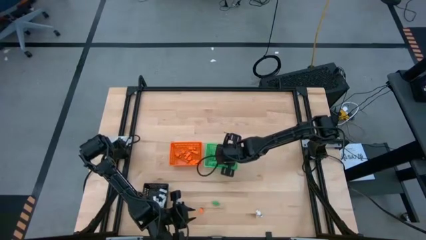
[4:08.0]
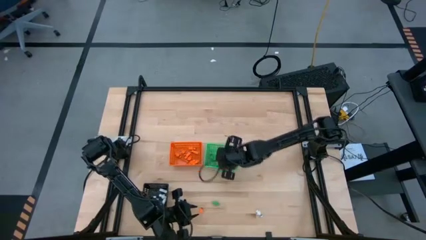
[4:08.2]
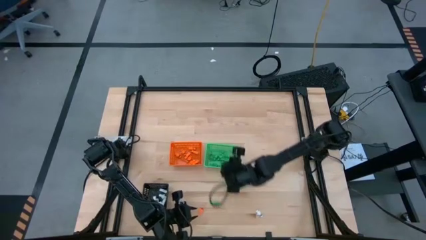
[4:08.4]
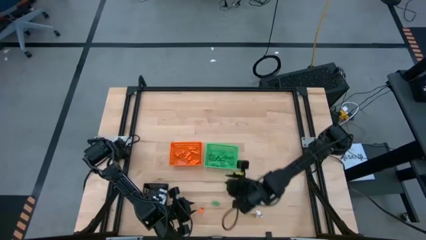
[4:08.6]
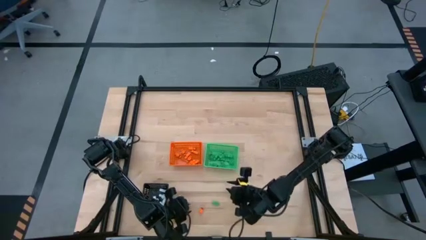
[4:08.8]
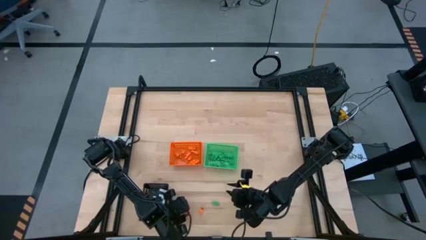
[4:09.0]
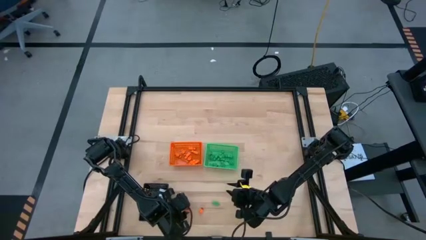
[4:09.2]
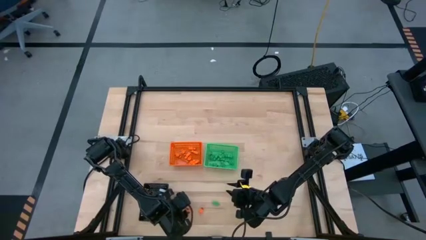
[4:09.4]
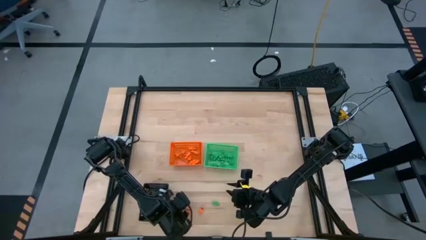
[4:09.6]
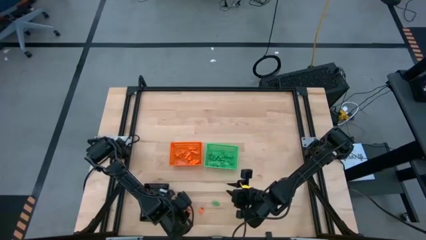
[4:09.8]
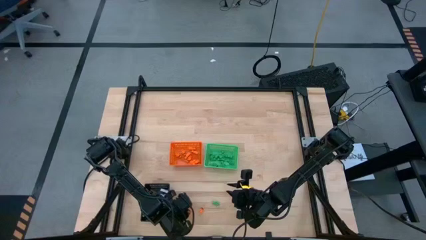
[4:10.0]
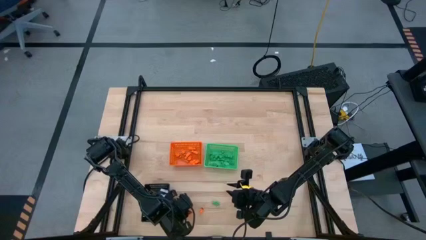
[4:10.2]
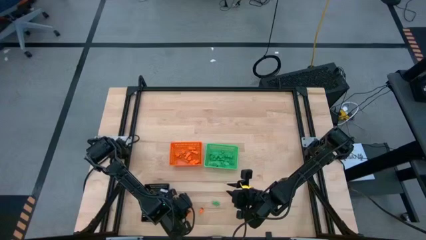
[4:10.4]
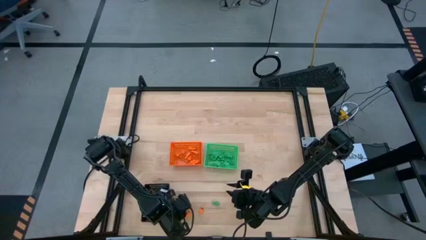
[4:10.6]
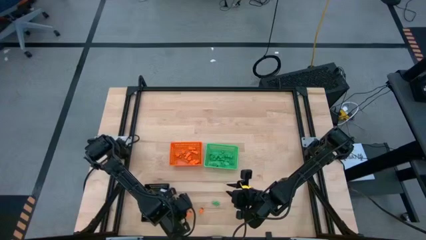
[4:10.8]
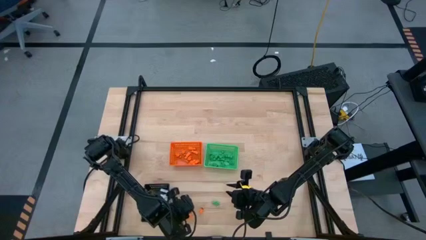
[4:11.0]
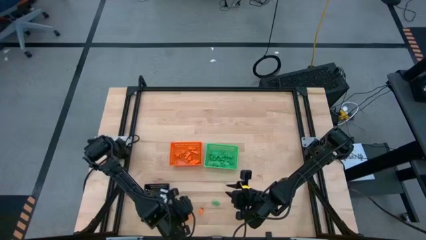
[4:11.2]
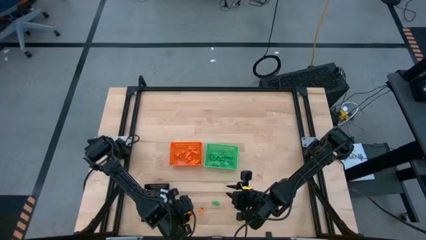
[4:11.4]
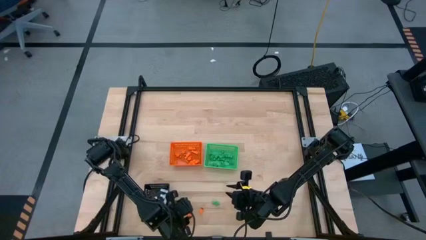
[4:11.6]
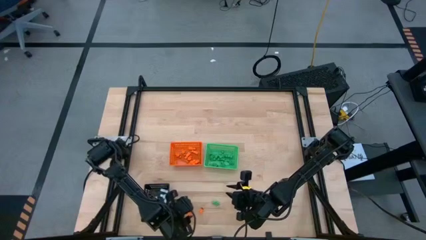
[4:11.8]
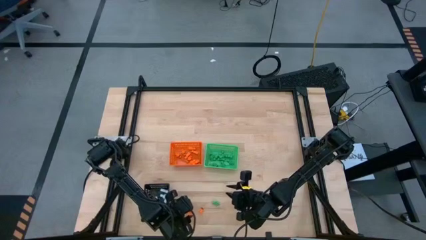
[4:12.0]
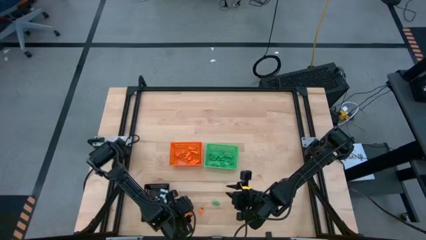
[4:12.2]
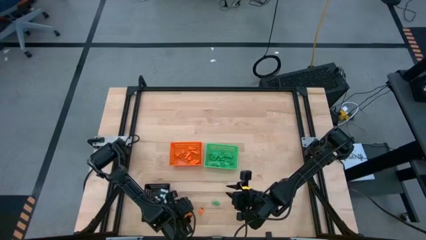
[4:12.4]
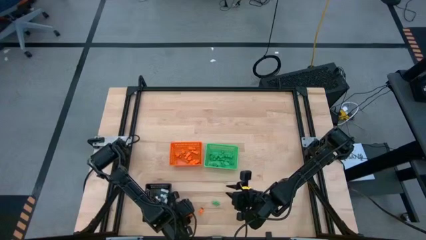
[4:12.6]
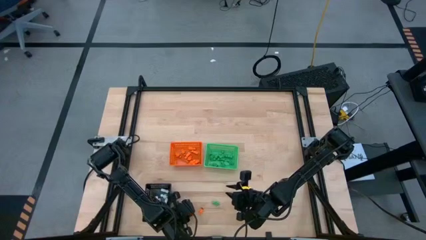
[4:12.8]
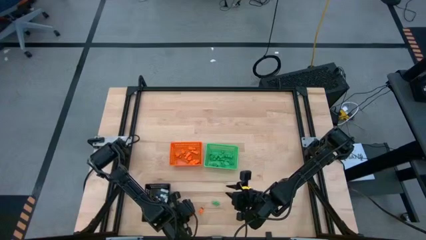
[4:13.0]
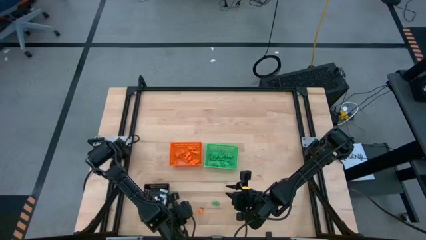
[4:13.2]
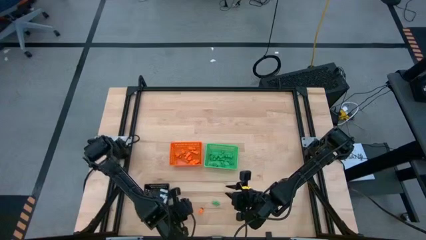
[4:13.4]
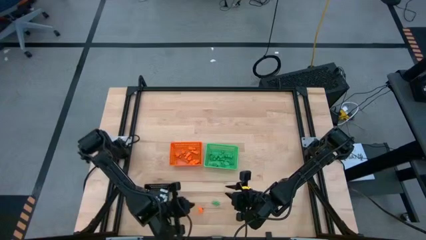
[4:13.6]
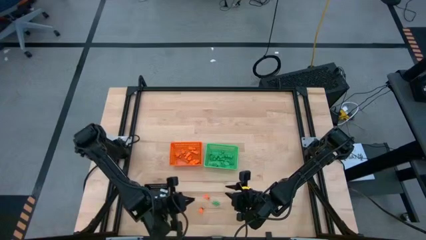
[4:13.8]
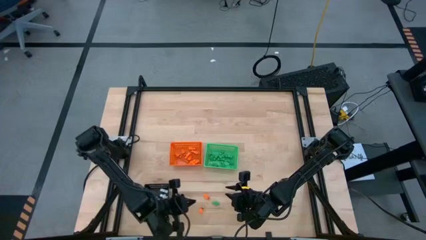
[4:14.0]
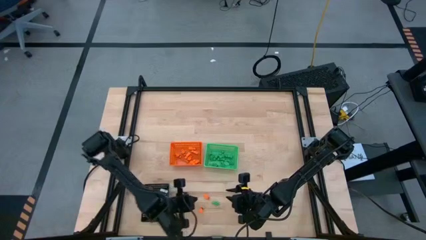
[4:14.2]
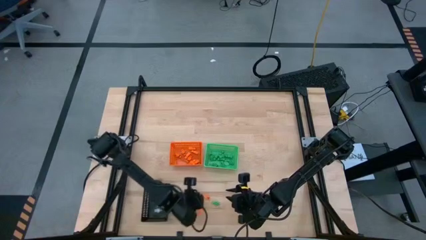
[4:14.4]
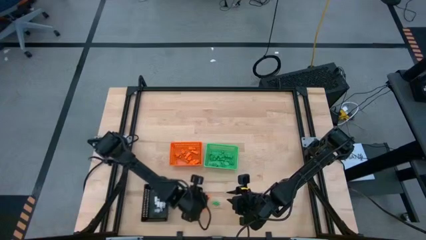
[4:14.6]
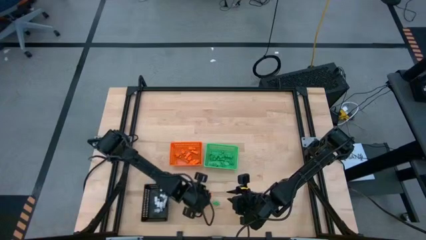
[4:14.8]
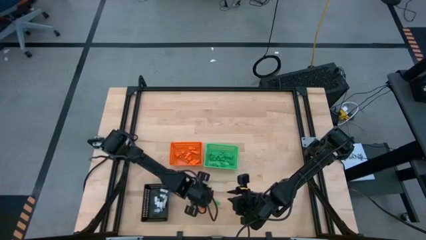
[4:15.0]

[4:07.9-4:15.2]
Task: Sort Halloween decoration
Put the orange skeleton toy into the orange bin

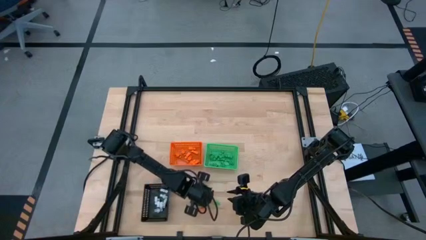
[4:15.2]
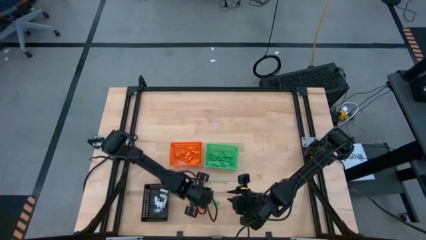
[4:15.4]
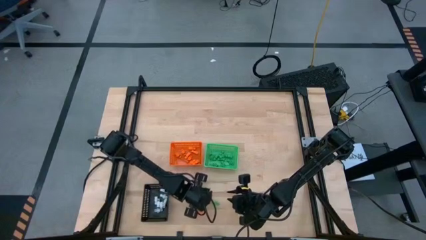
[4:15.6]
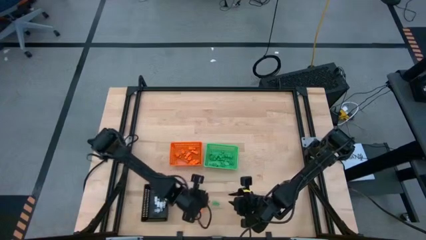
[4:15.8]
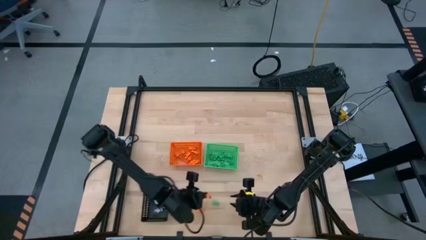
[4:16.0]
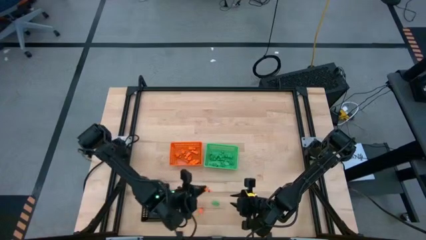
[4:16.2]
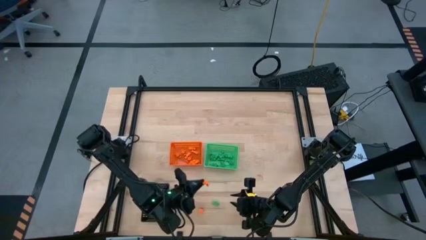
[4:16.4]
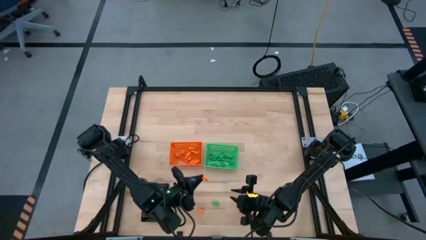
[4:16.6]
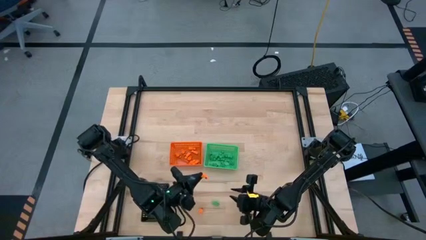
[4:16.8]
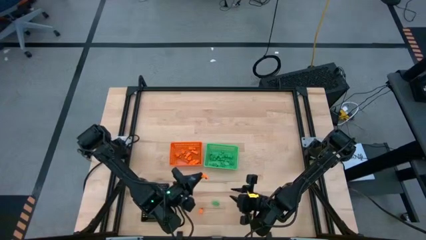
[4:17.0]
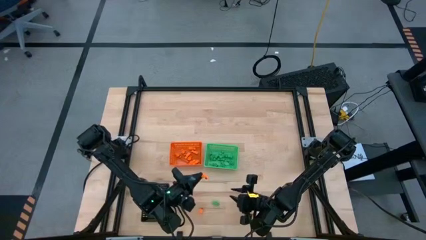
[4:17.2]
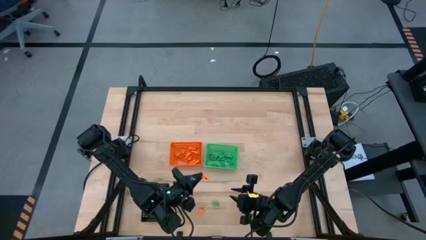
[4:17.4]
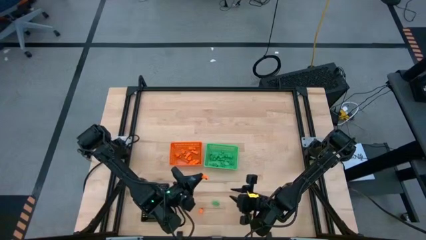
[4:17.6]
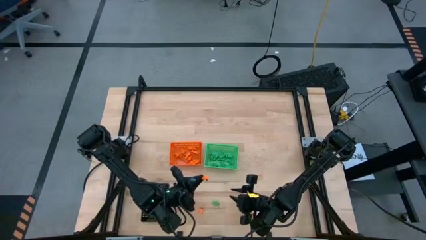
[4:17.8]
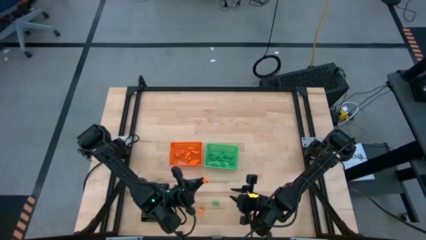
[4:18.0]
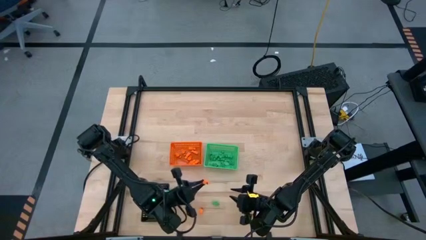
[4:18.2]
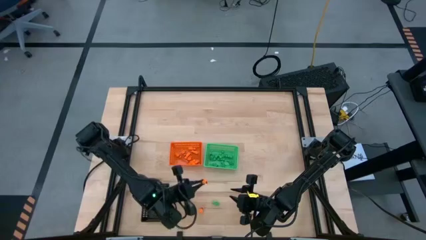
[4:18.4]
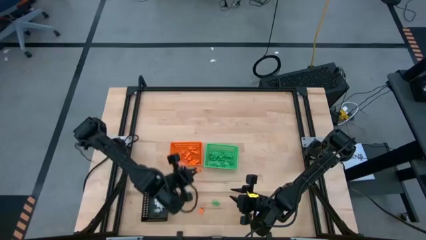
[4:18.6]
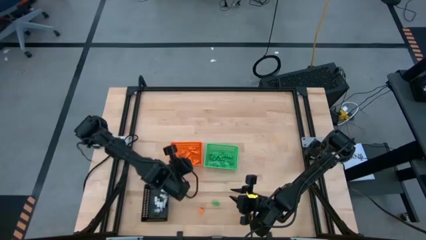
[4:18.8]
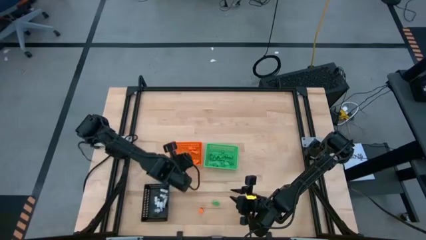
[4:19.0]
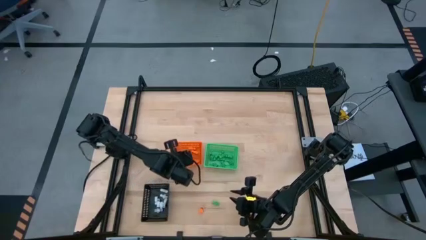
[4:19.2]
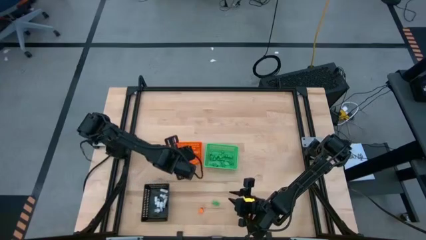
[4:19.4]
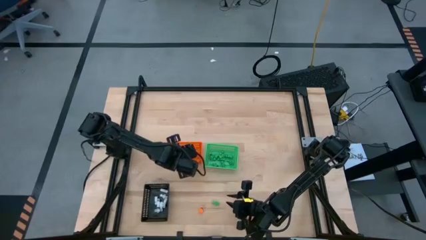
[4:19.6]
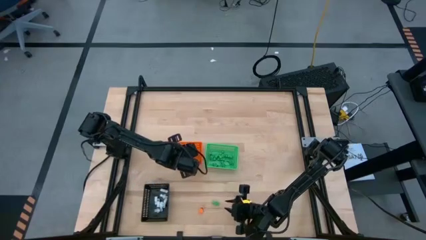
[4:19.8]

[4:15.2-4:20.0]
Put the orange skeleton toy into the orange bin

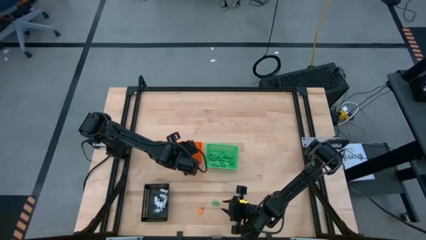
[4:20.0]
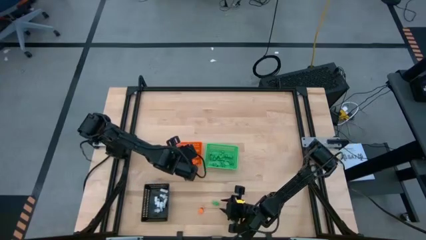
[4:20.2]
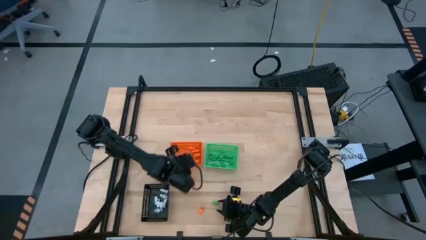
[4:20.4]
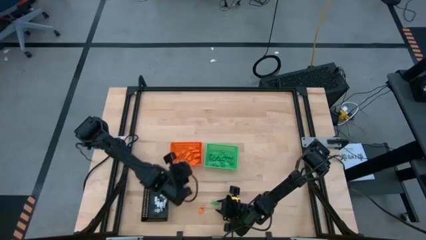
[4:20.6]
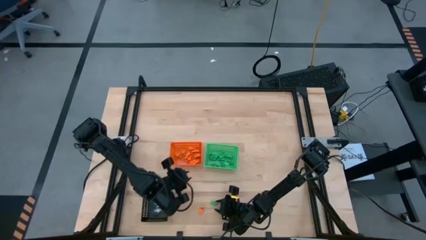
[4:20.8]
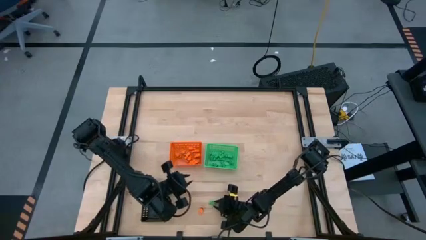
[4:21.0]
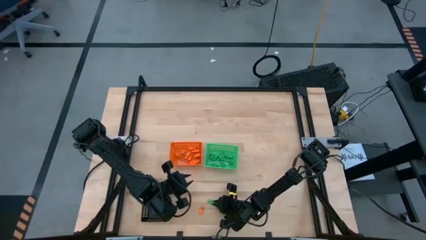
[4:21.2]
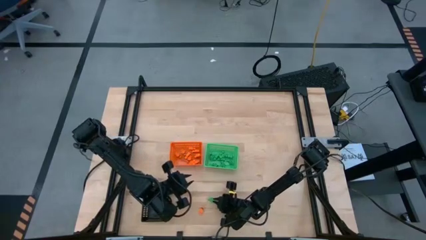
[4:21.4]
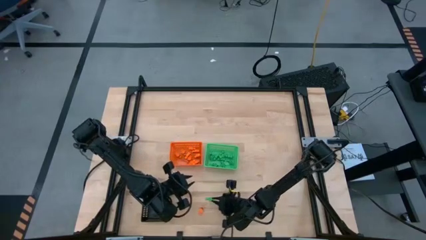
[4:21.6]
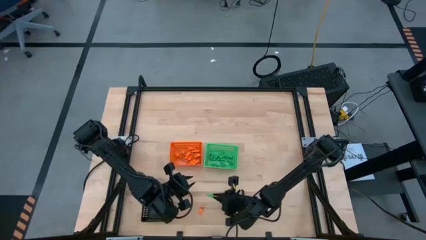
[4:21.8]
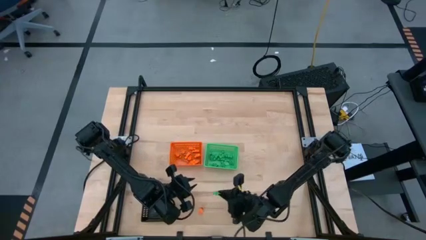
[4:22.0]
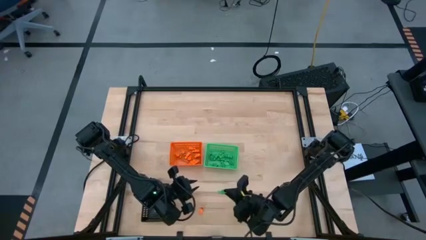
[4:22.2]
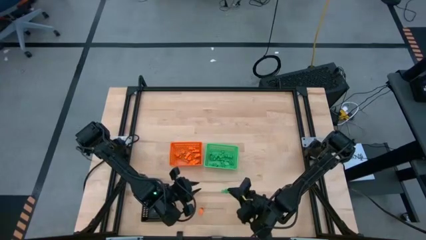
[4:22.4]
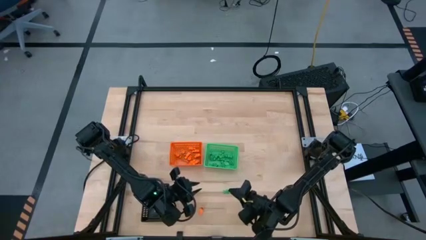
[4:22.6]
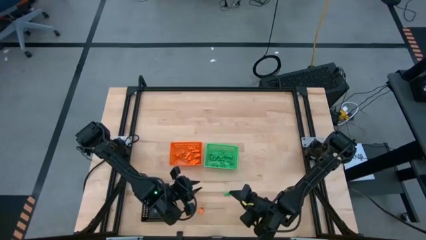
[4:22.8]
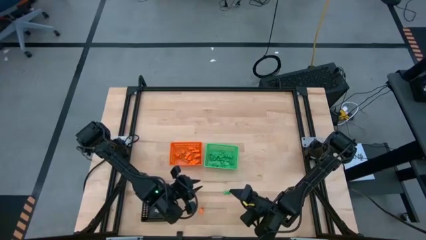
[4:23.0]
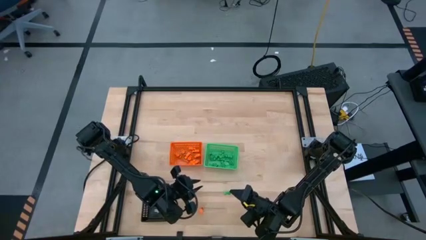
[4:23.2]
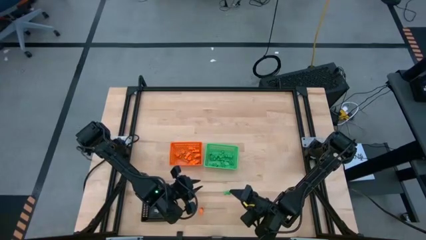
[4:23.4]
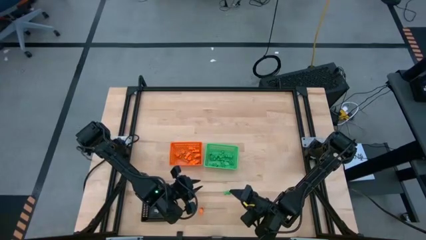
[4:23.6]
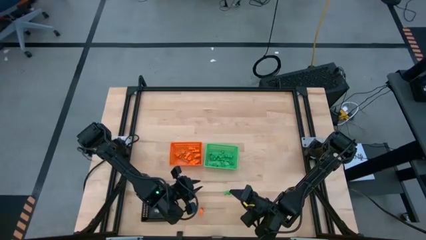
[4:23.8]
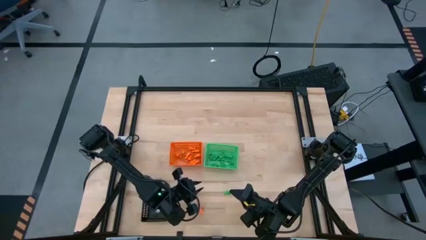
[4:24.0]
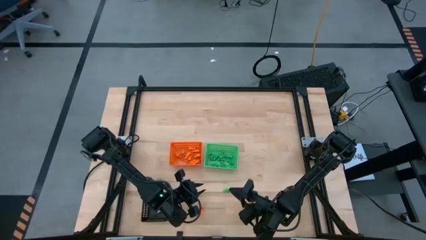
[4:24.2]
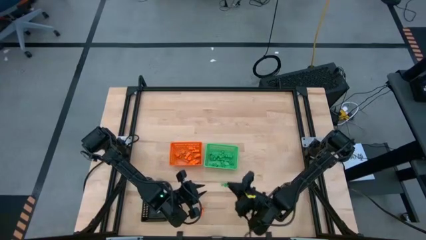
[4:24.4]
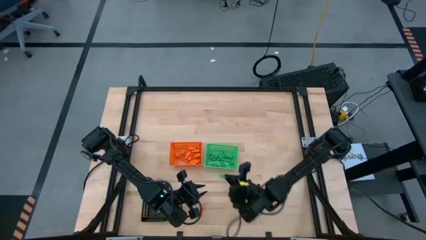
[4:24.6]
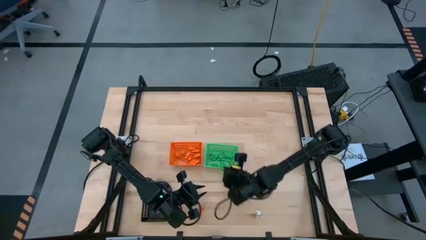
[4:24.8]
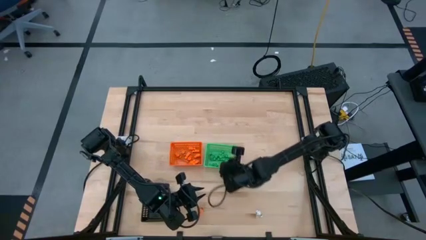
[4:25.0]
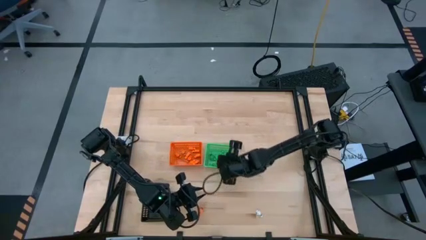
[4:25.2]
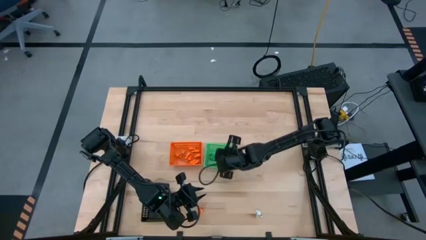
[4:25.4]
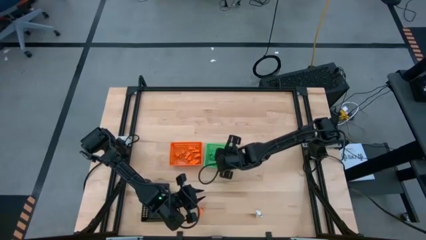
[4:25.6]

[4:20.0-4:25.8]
Put the green skeleton toy into the green bin
